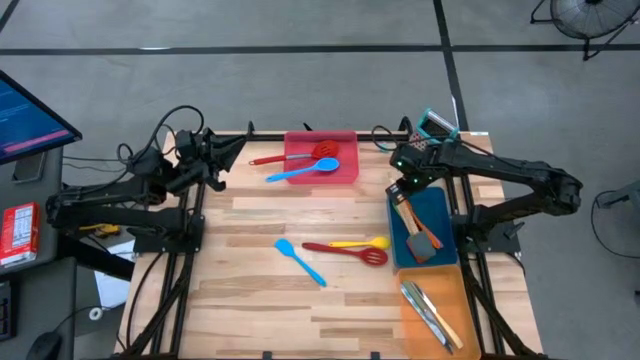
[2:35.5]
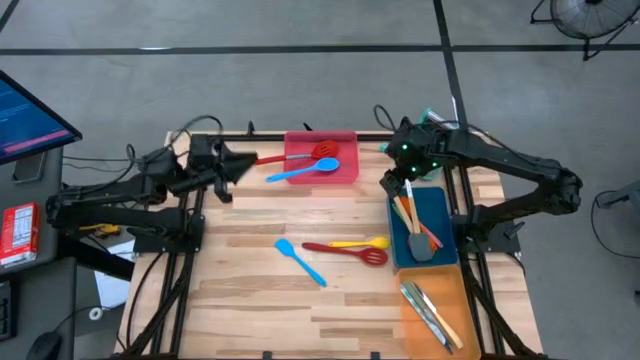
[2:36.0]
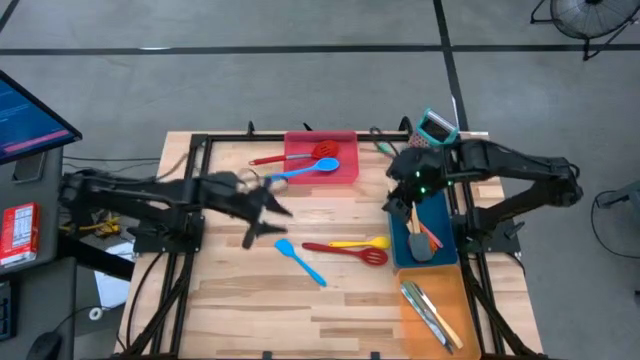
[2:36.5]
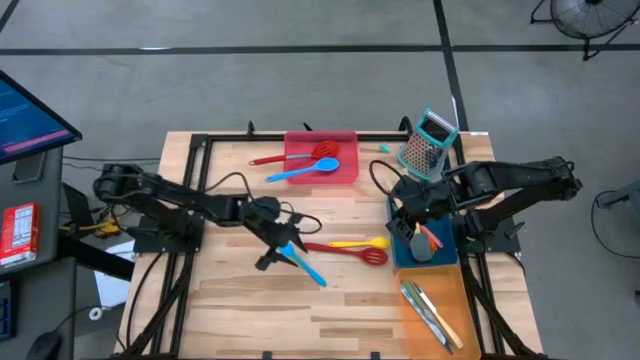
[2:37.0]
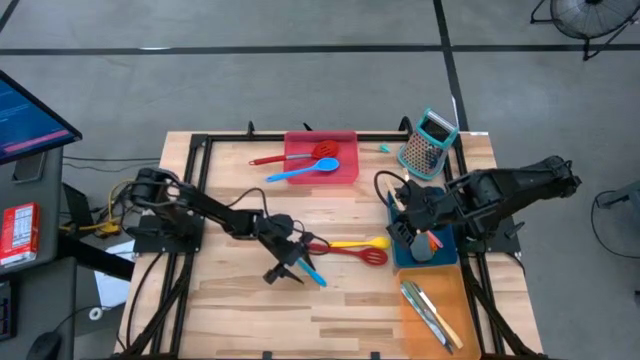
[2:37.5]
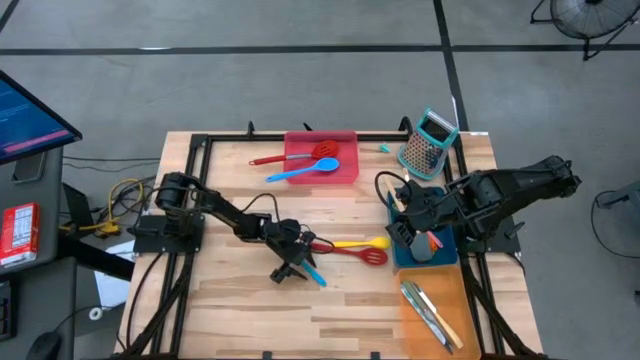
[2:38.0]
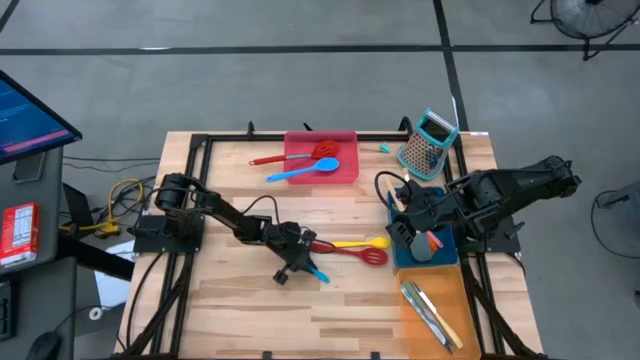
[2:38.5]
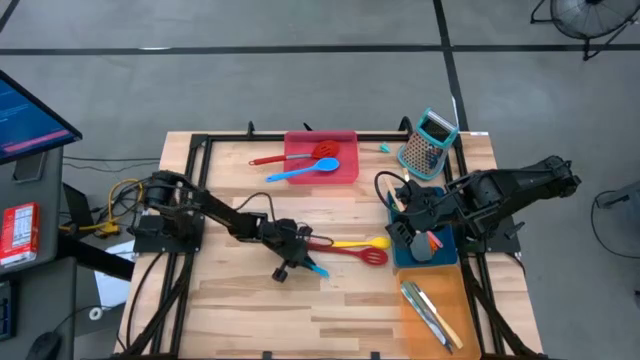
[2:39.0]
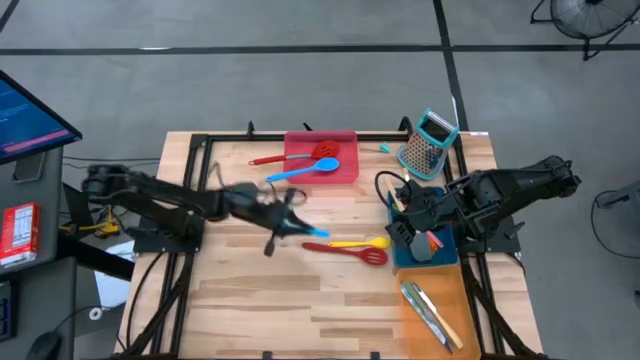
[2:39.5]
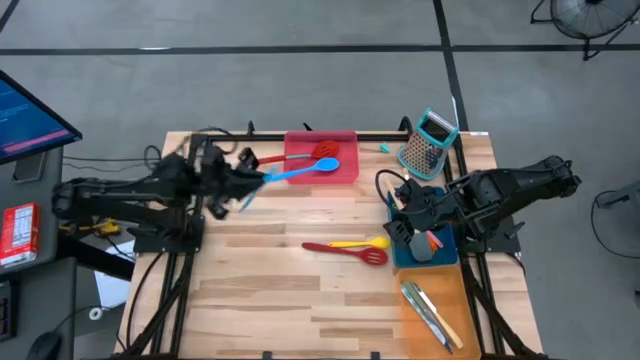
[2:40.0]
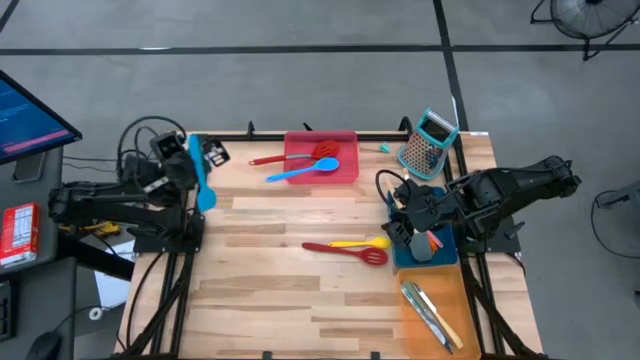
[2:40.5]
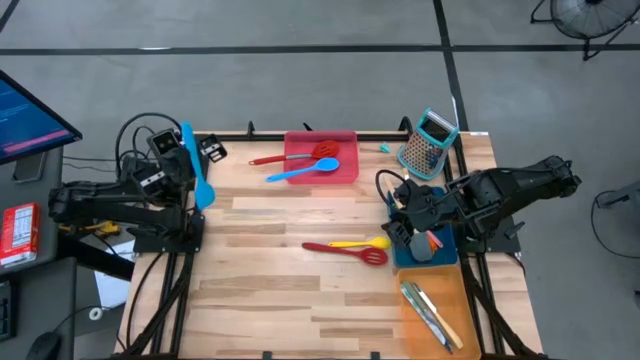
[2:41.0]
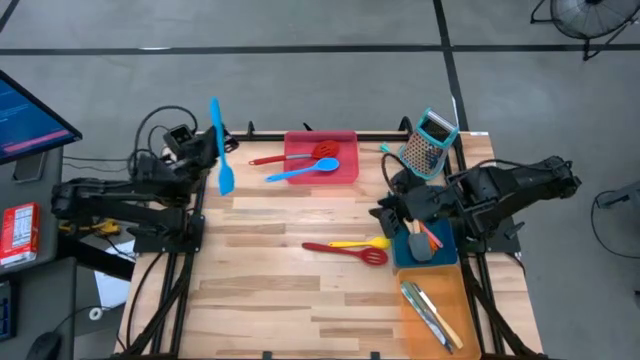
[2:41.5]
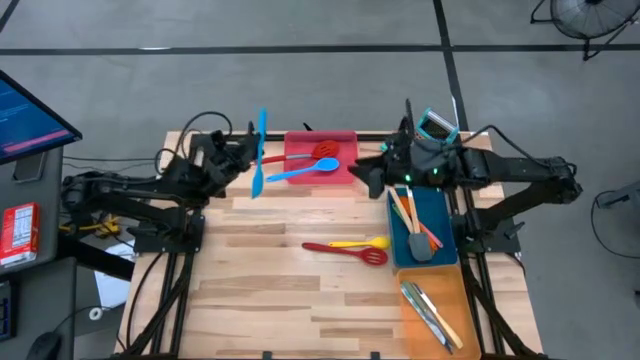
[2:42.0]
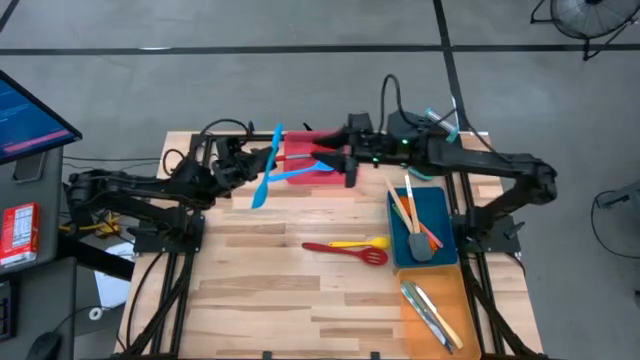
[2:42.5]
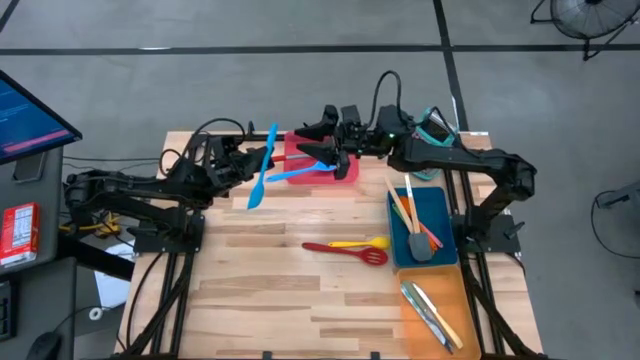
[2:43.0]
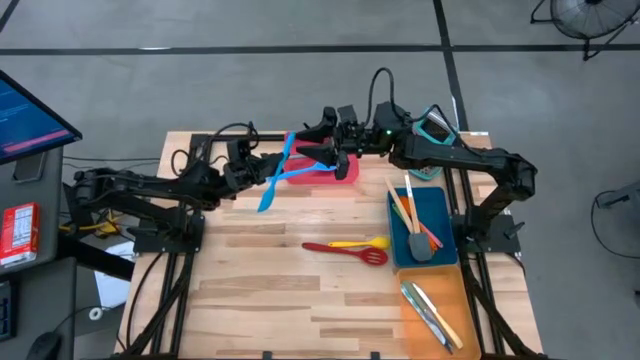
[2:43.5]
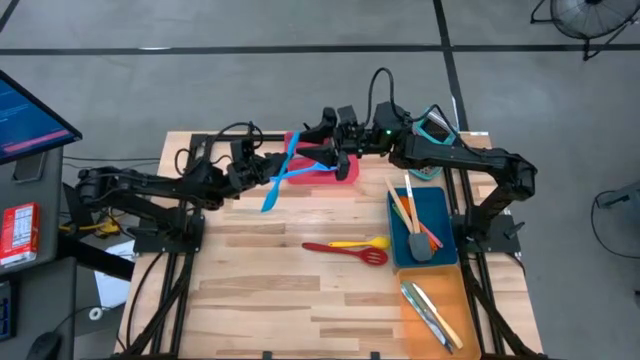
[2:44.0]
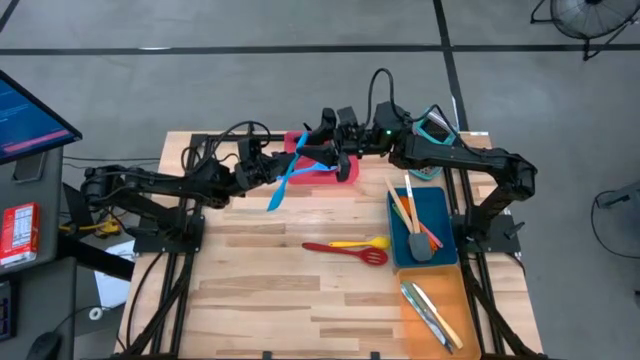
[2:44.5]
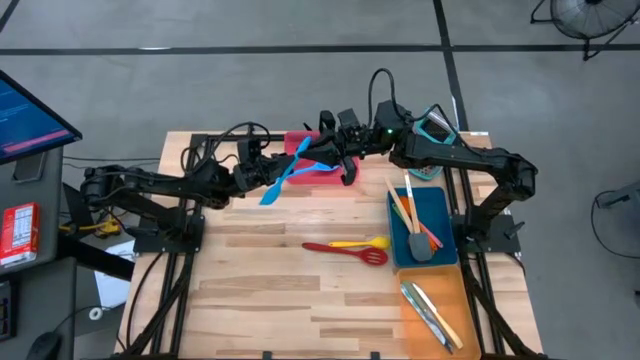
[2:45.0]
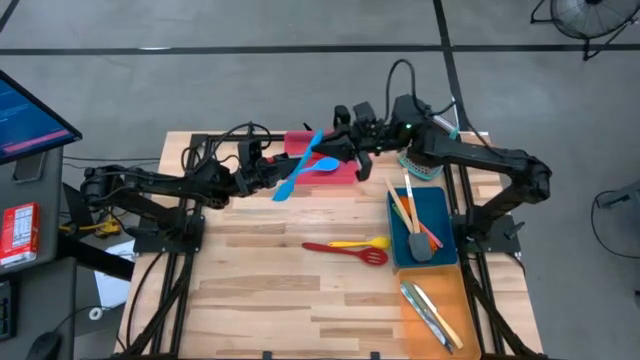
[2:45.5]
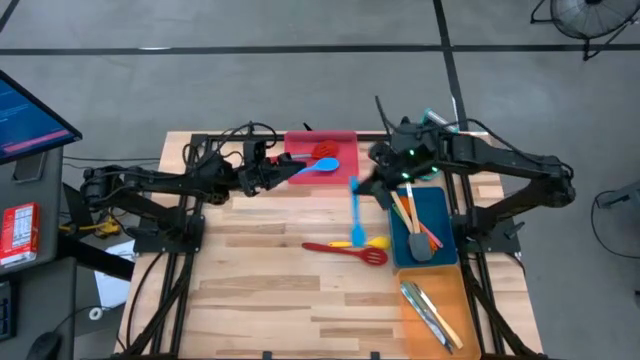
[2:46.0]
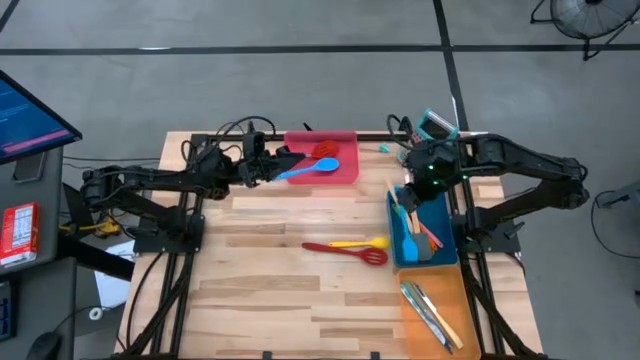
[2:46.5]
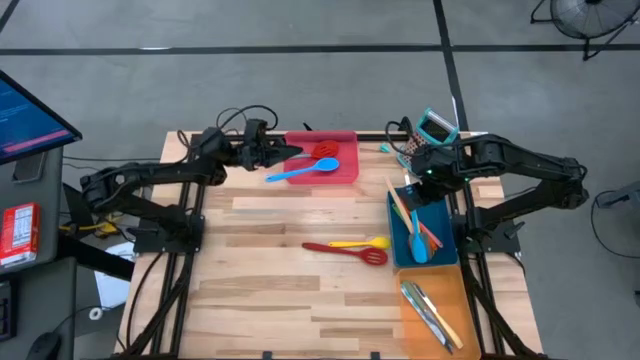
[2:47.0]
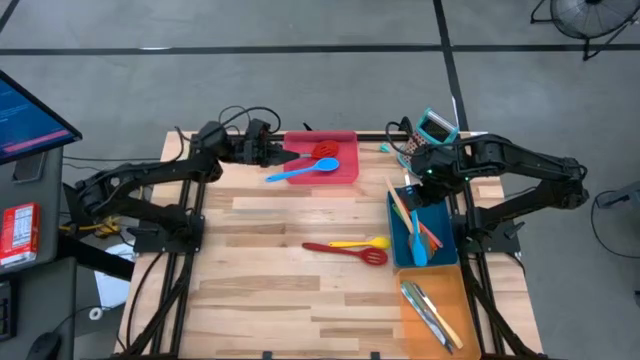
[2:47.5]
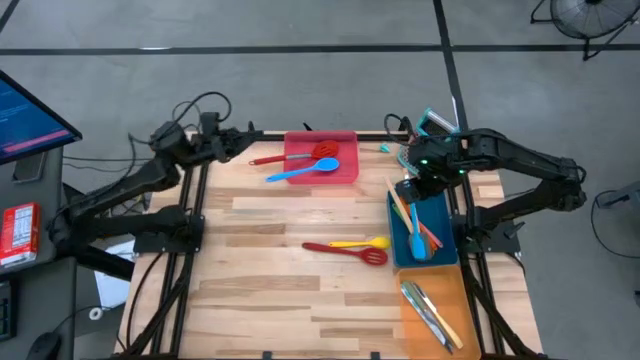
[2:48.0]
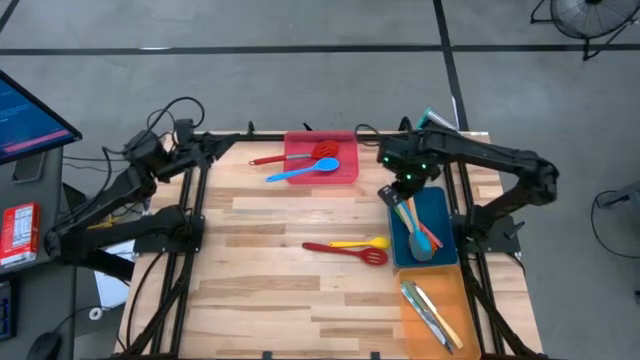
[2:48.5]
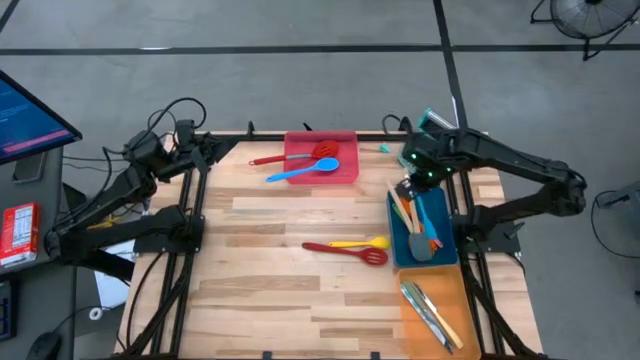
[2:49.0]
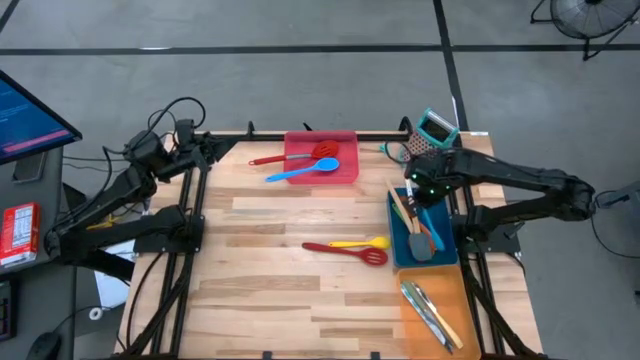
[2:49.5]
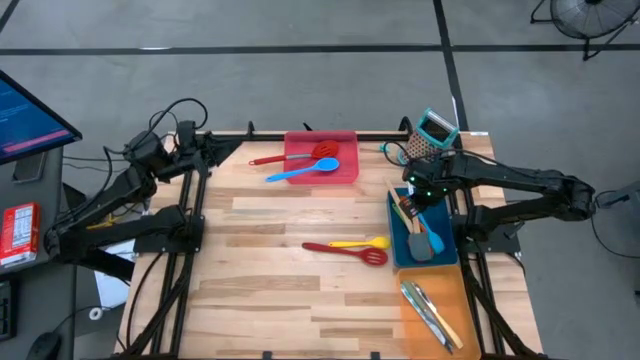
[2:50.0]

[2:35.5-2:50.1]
Task: Pick & Place Kitchen Items
Put the blue spatula into the blue bin

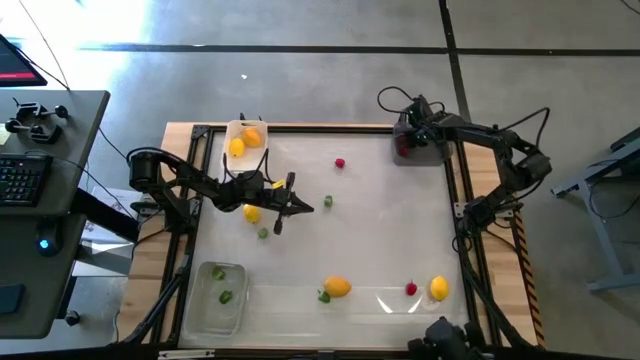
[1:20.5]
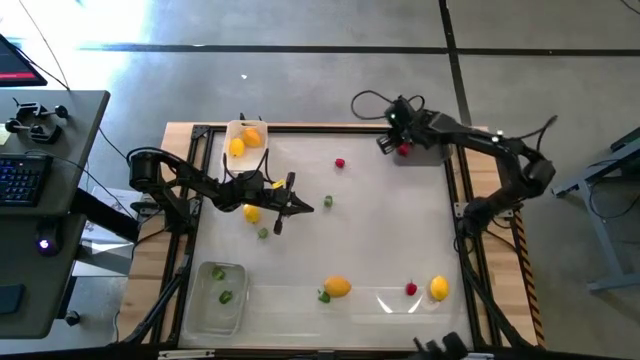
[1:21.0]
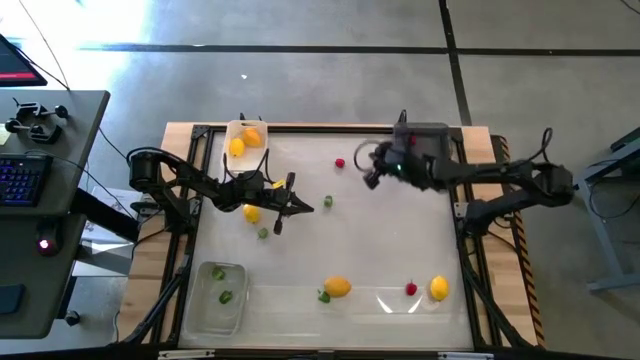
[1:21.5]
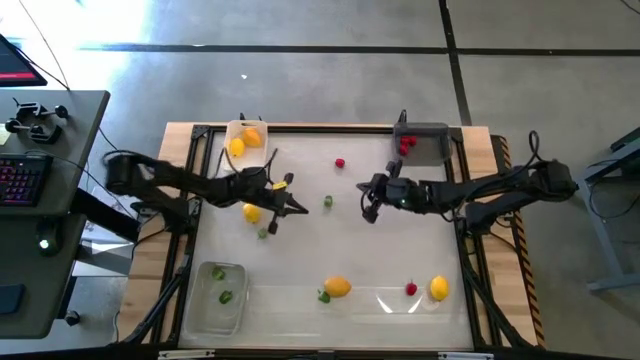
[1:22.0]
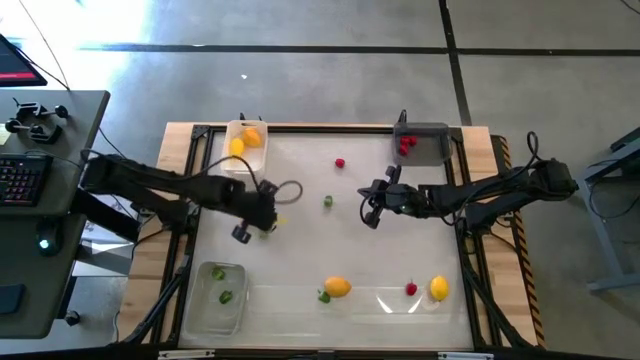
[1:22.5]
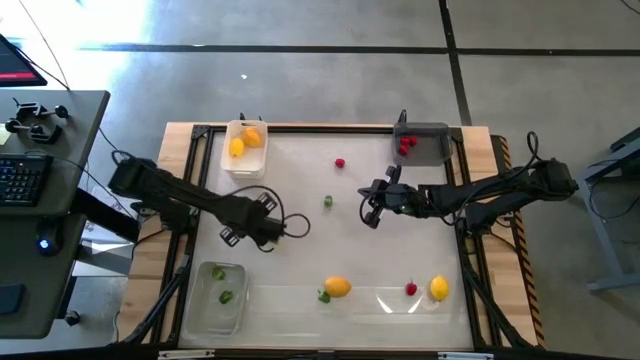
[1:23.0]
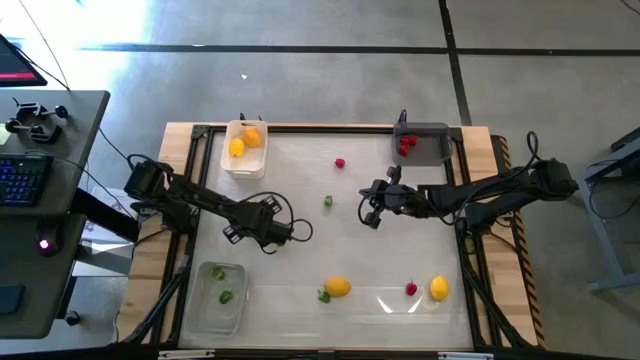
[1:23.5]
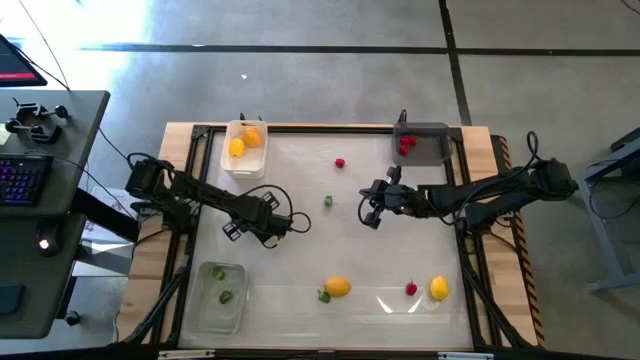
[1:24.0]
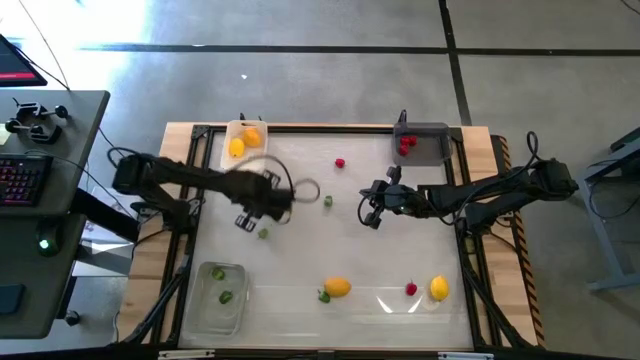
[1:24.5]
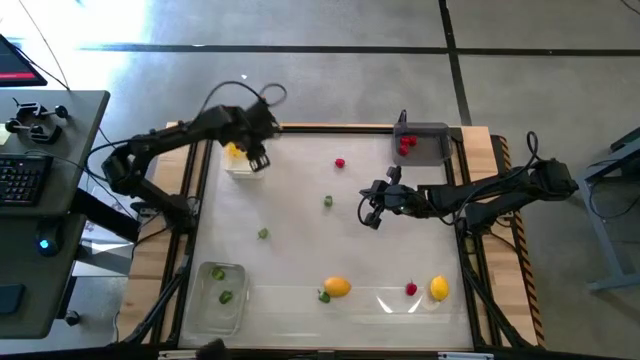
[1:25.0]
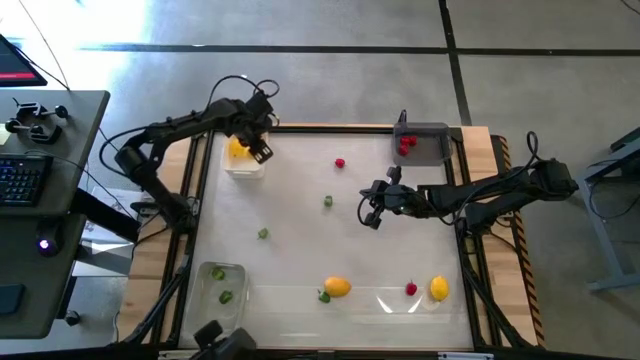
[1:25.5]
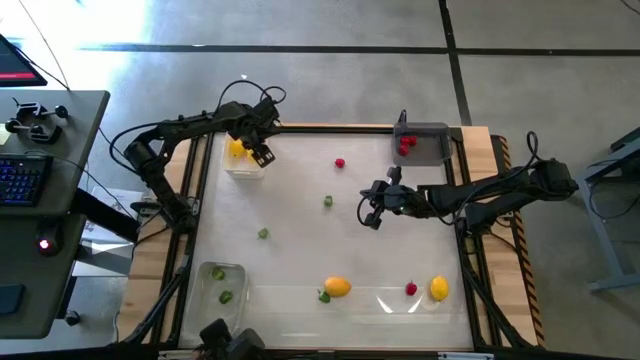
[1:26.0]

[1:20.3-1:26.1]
Task: Sort produce into baskets
Put the lemon into the white bin
